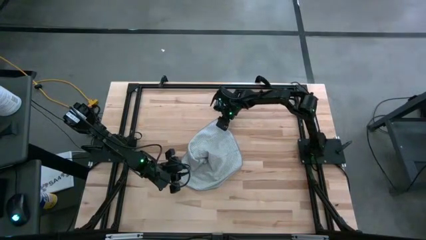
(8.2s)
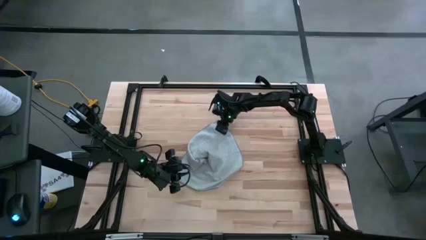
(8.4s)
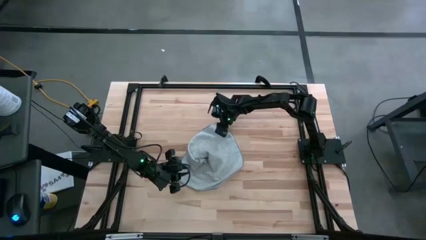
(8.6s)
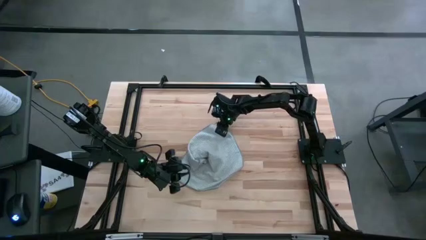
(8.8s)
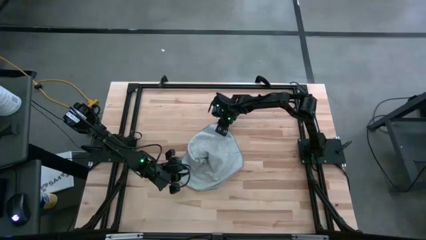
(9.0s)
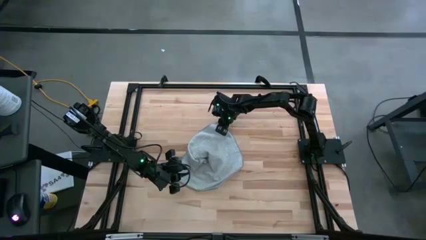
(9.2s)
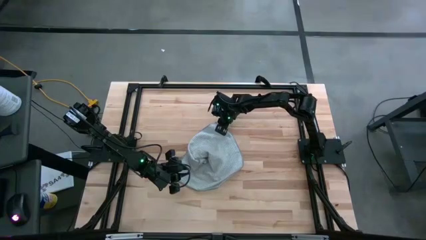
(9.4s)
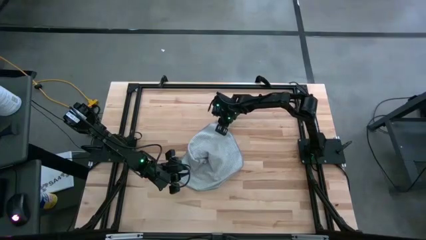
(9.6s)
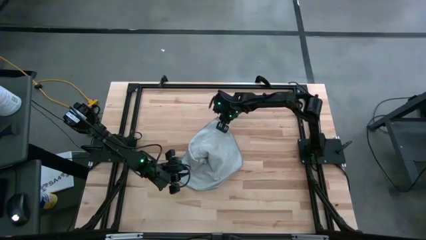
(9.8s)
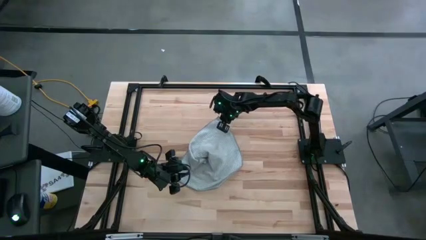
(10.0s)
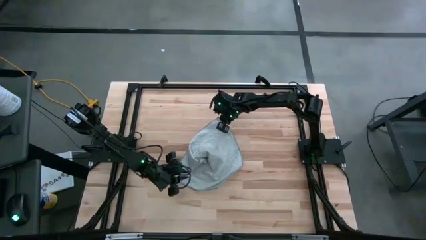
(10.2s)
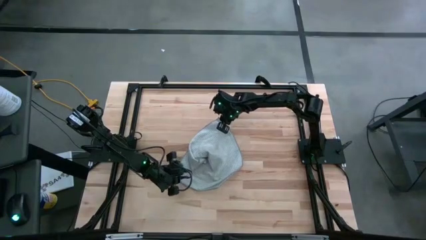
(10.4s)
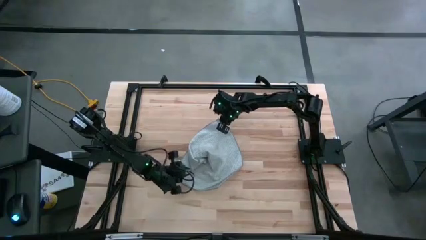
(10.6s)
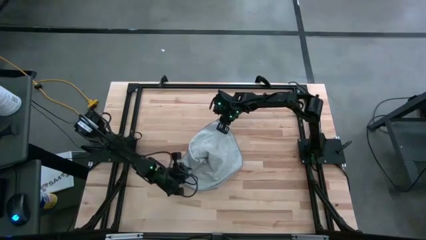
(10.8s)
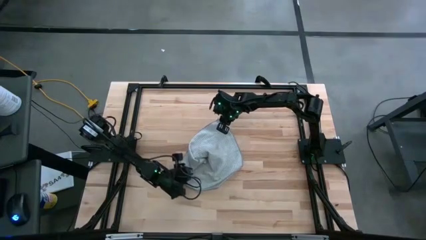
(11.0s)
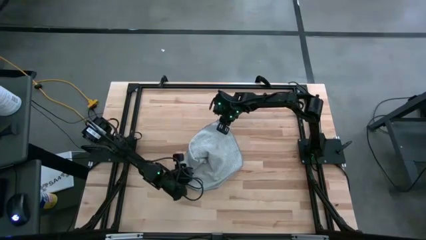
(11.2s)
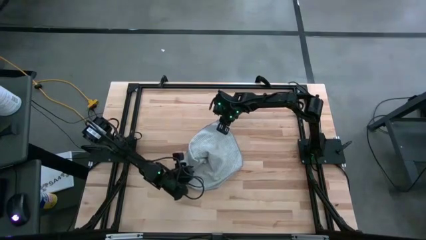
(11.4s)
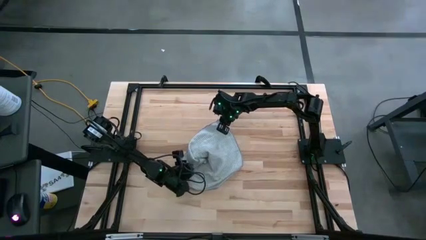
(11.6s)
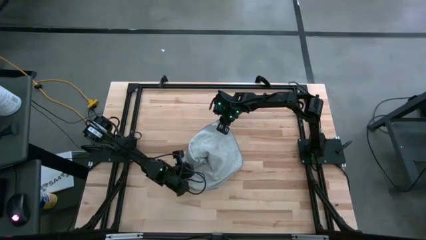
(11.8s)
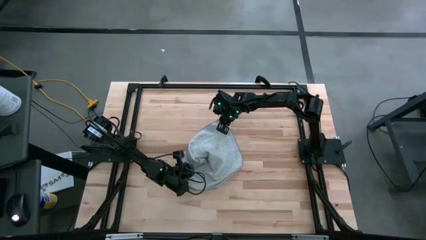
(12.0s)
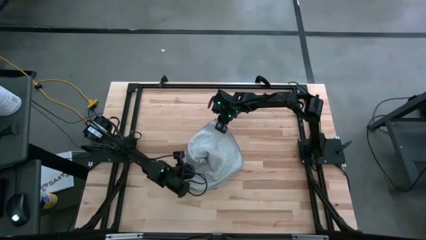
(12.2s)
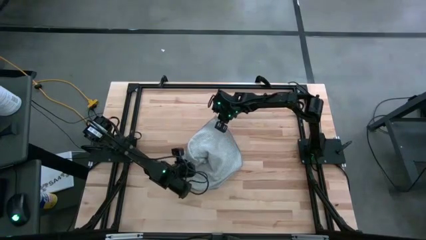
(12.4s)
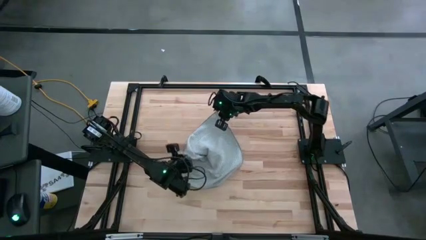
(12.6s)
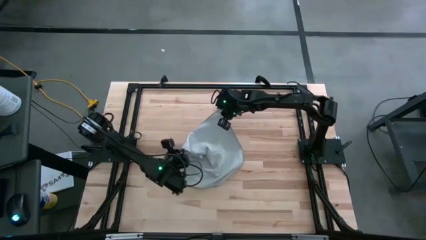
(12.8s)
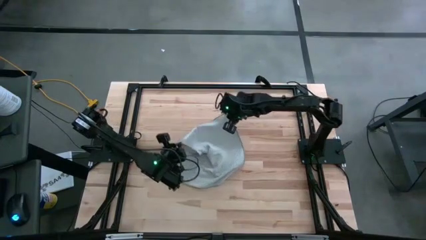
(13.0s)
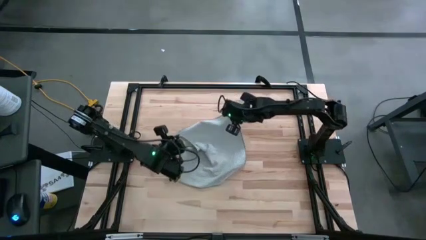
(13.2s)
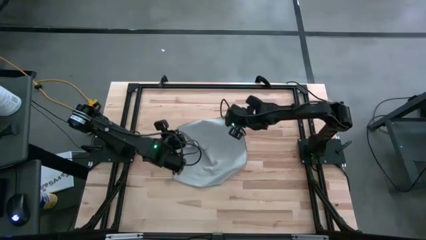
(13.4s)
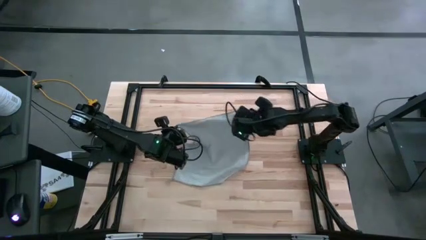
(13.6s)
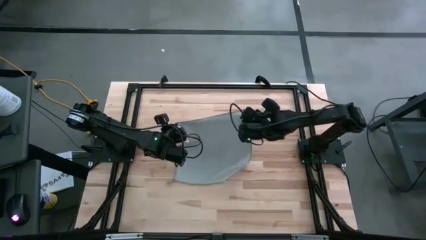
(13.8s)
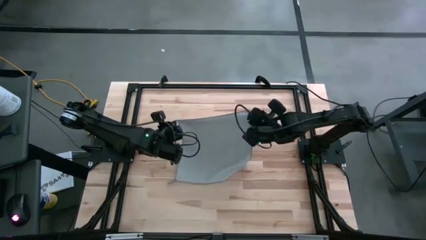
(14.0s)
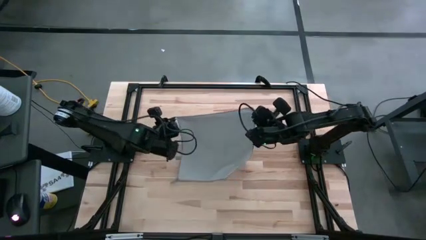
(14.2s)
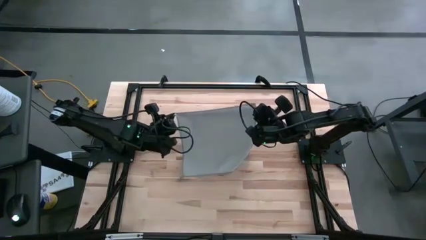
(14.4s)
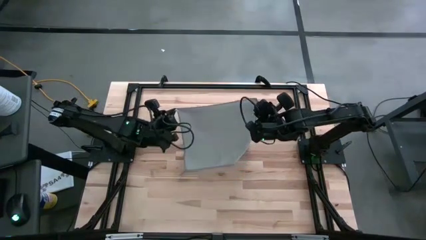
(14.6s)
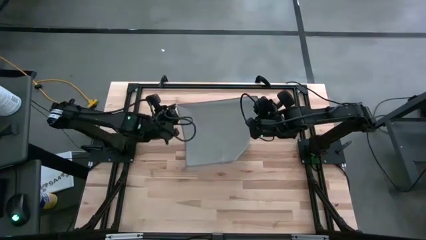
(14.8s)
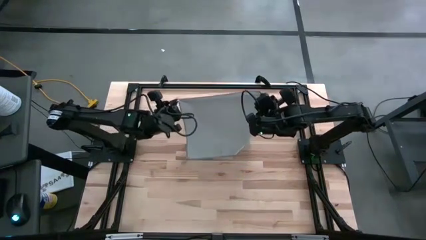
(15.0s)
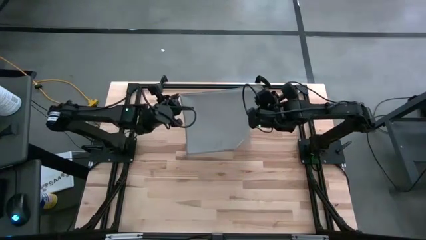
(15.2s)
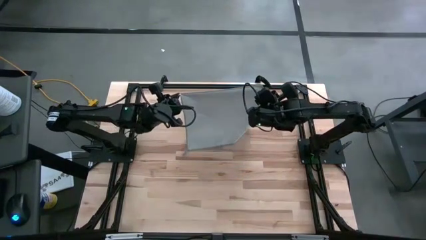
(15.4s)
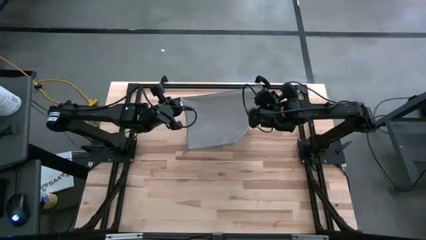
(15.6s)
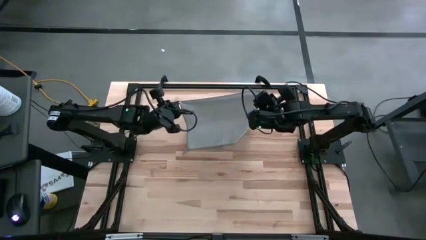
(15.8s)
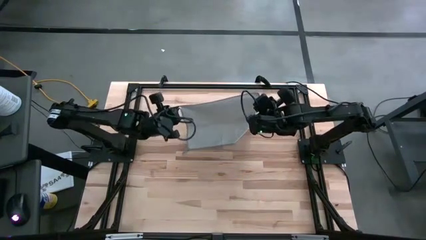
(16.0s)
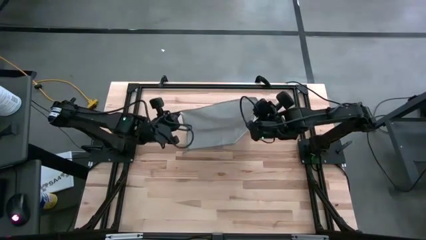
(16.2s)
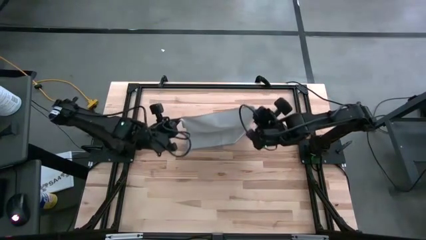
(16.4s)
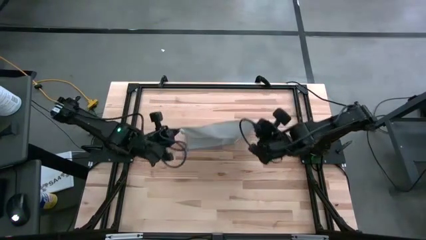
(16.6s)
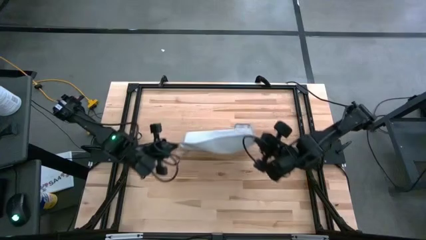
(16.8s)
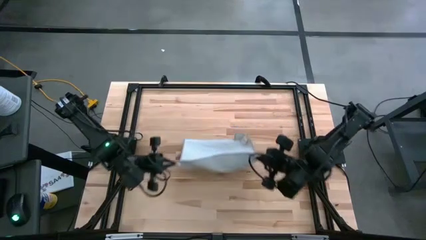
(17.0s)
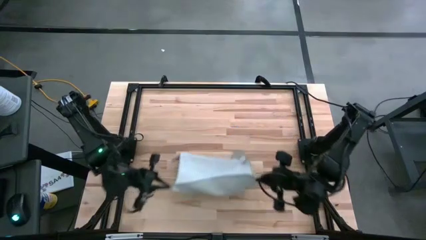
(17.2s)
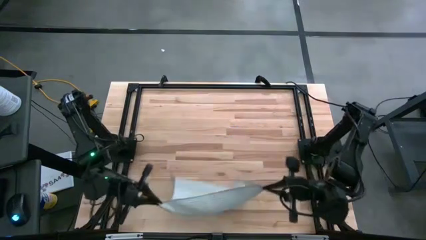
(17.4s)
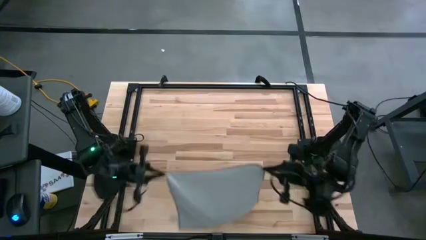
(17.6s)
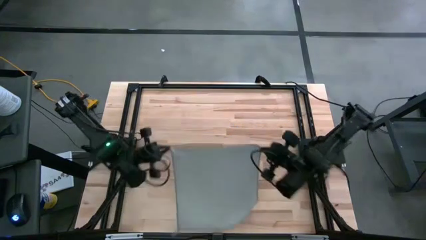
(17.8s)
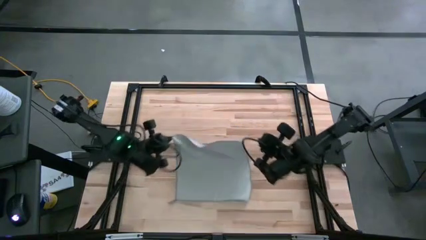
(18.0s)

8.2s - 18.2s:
Task: Fold microfiber towels
Fold the gray towel
